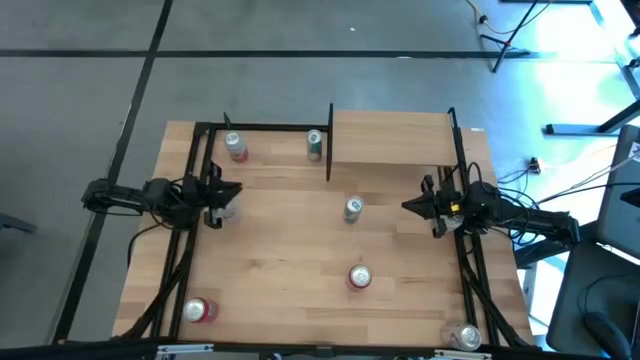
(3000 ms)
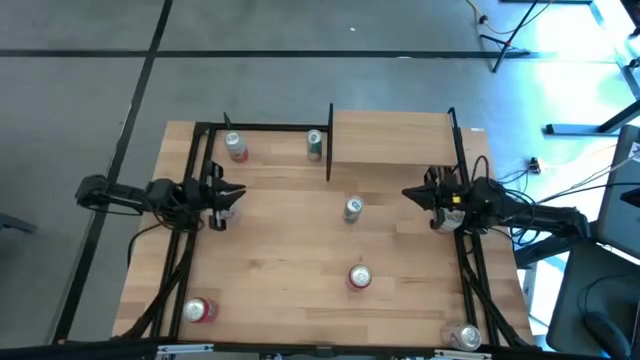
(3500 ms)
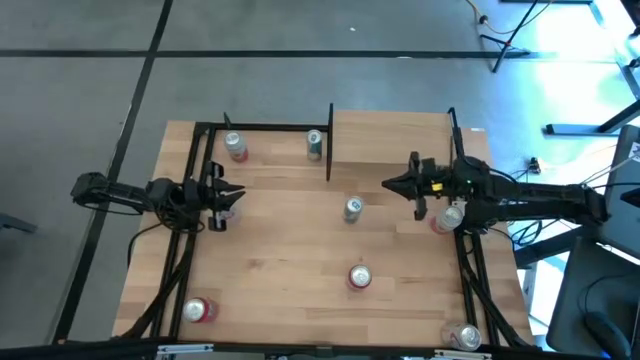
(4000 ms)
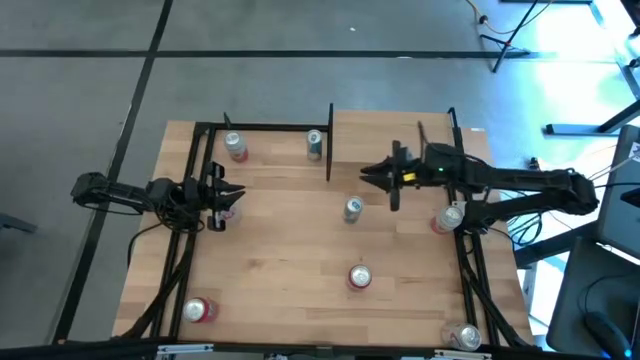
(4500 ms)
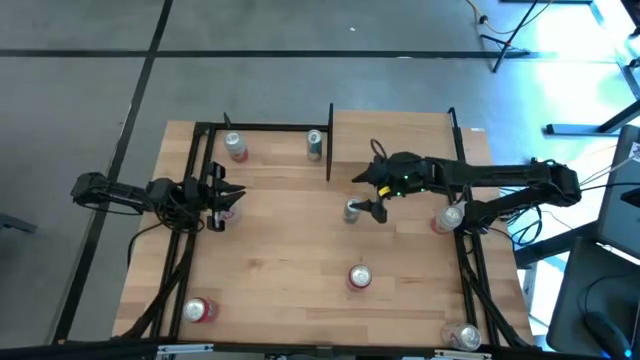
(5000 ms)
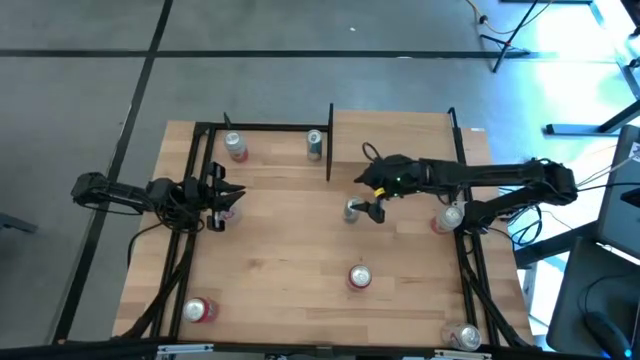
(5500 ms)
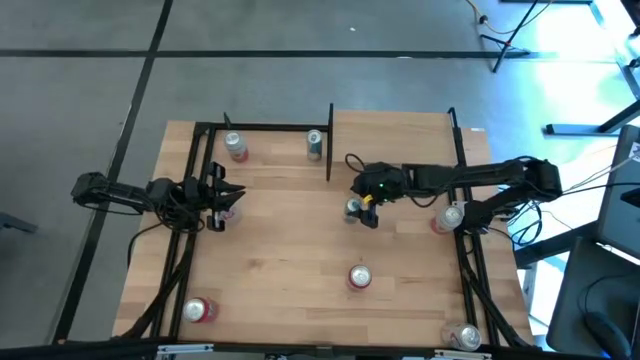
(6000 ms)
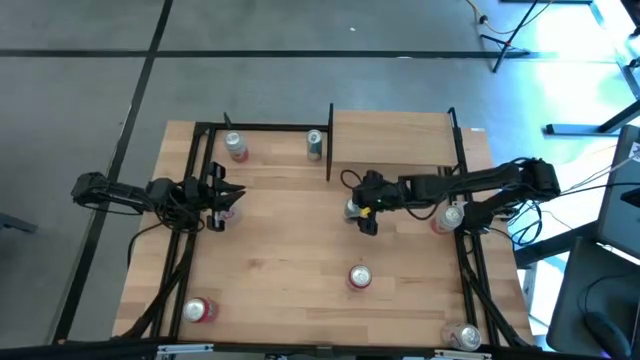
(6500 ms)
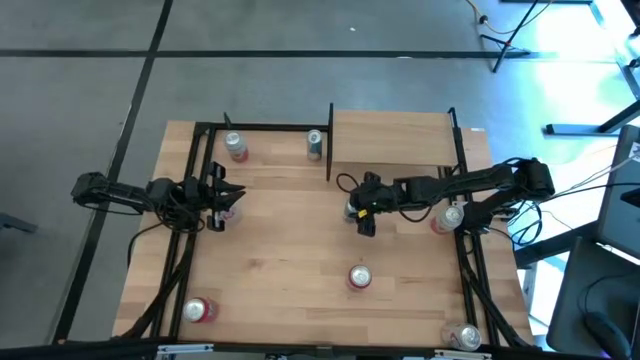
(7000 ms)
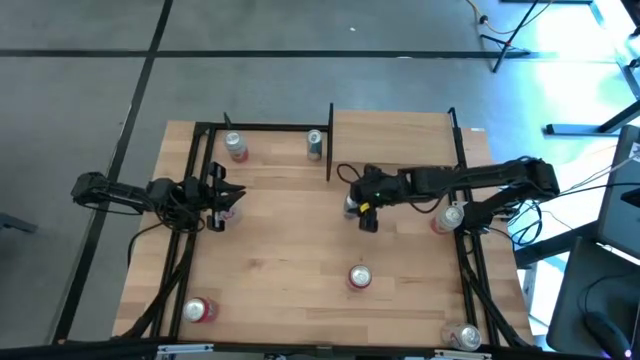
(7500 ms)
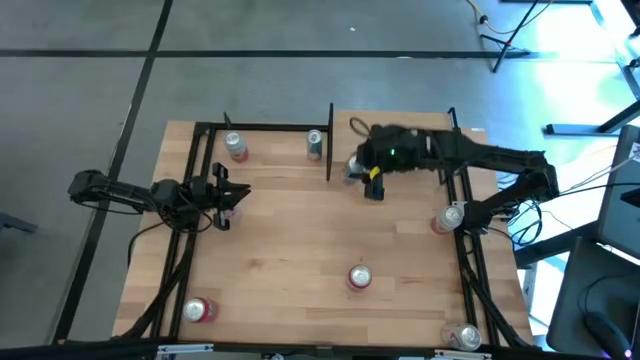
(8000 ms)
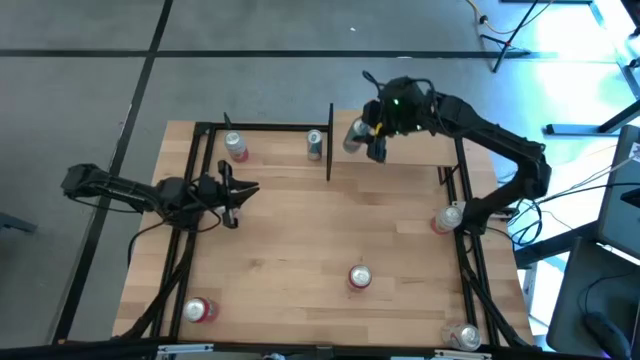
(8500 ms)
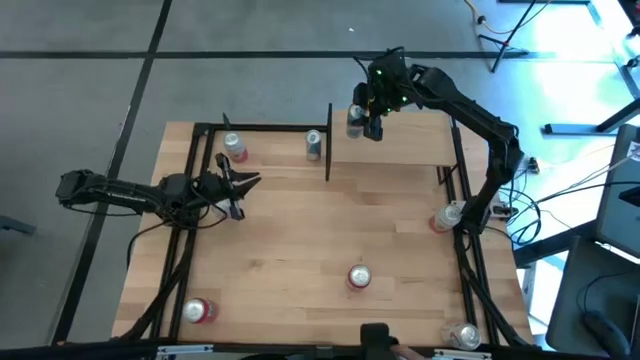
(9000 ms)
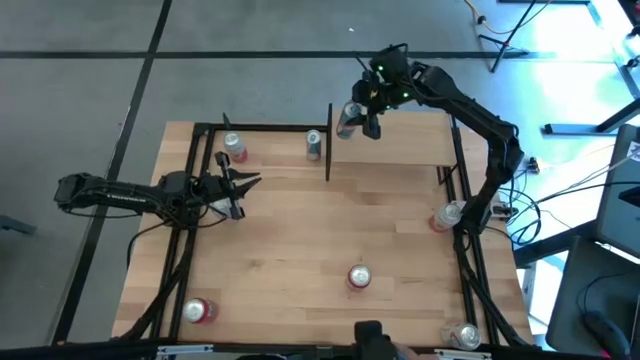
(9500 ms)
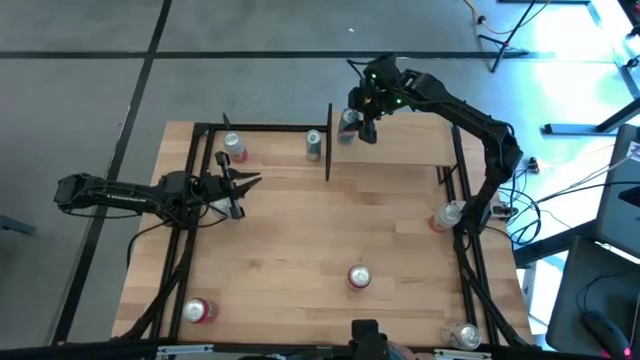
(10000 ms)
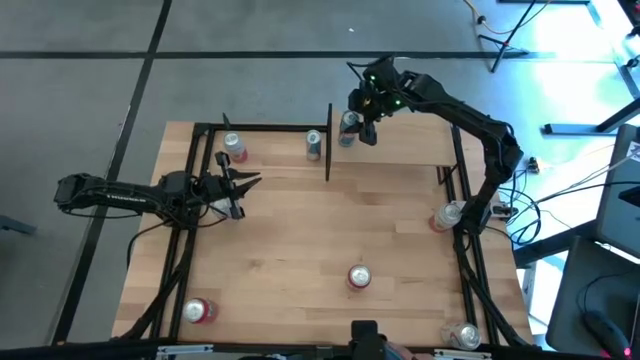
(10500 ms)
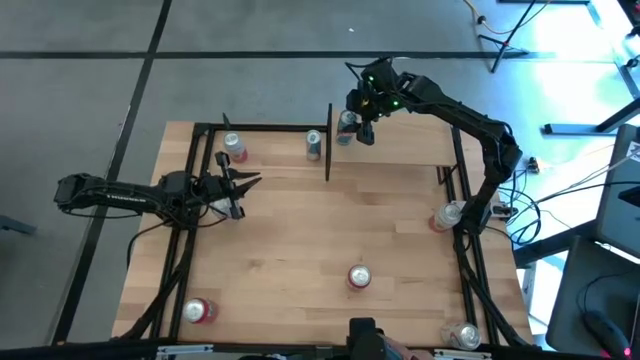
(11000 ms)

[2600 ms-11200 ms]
Task: Place canned beverage on shelf
Put the bottom blue soda can on the shelf

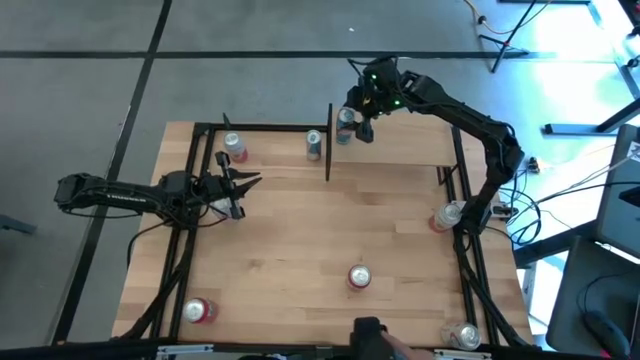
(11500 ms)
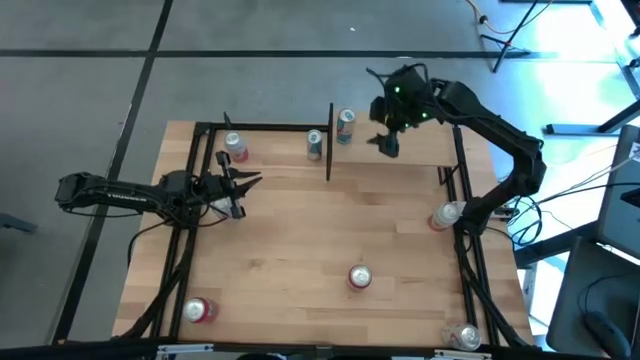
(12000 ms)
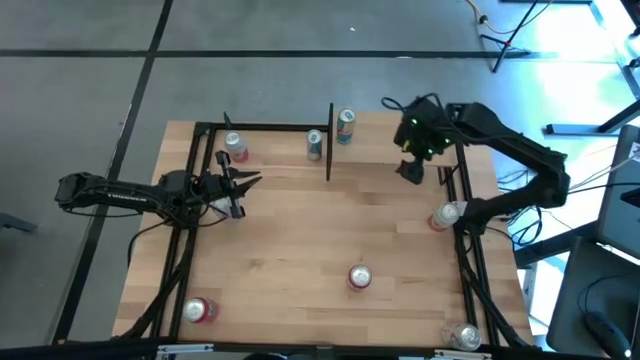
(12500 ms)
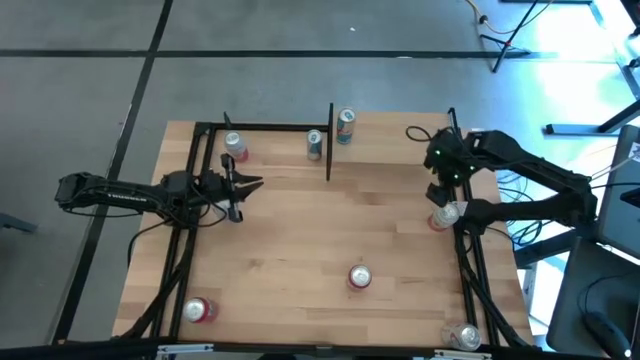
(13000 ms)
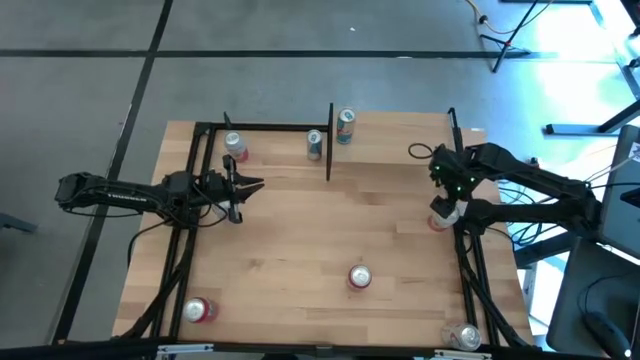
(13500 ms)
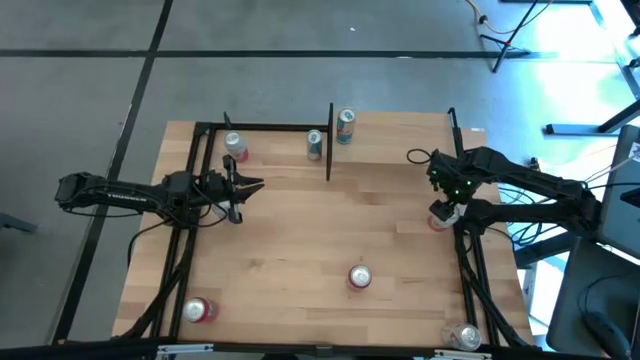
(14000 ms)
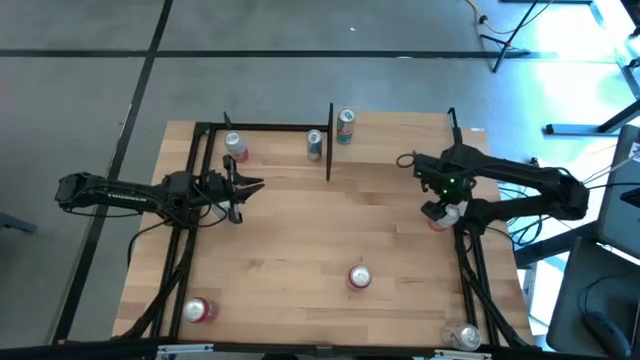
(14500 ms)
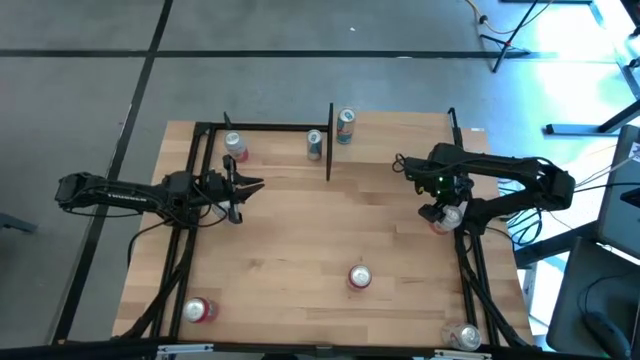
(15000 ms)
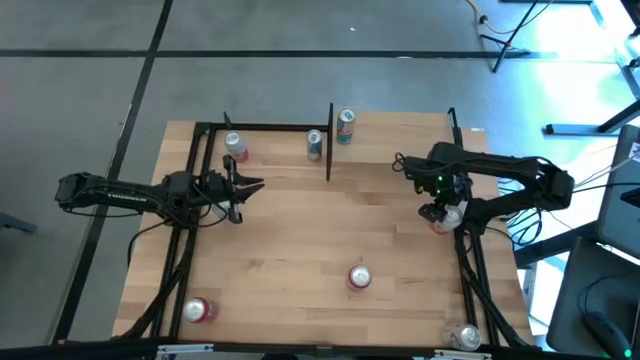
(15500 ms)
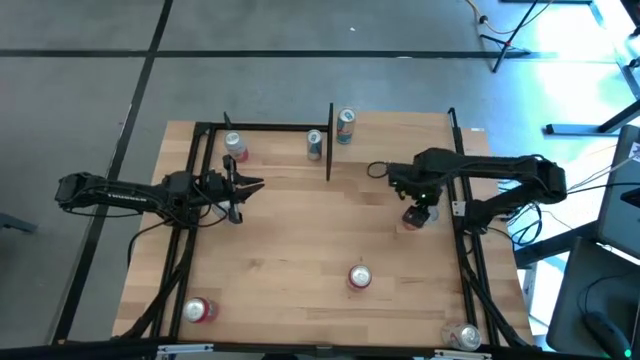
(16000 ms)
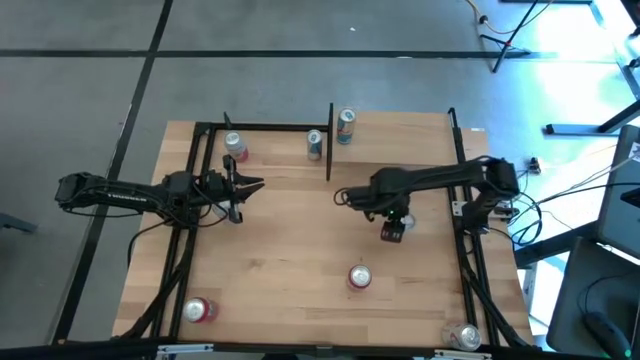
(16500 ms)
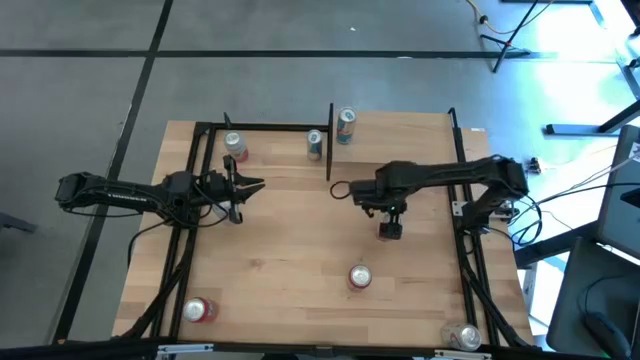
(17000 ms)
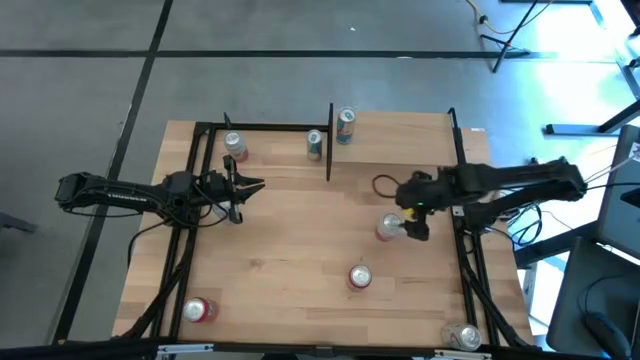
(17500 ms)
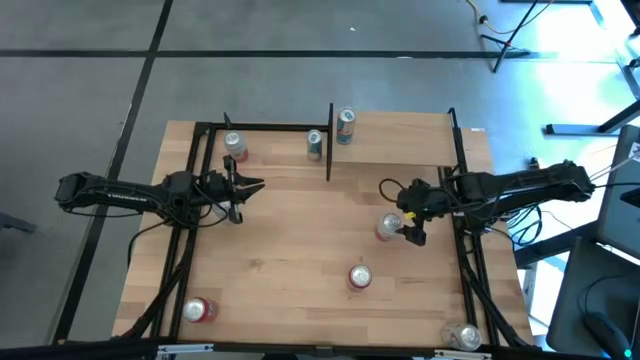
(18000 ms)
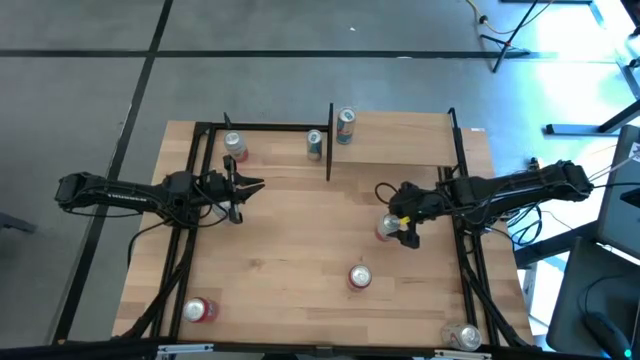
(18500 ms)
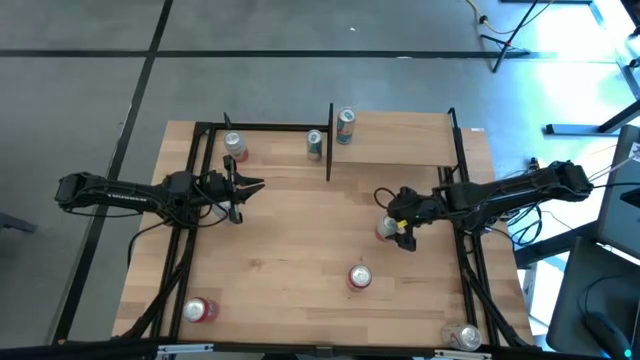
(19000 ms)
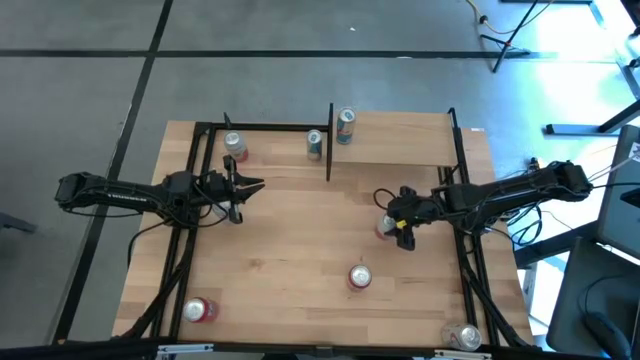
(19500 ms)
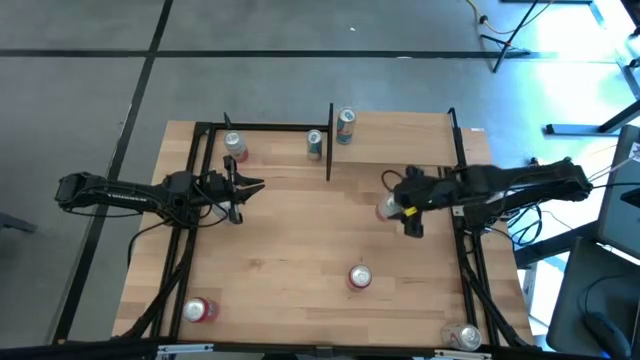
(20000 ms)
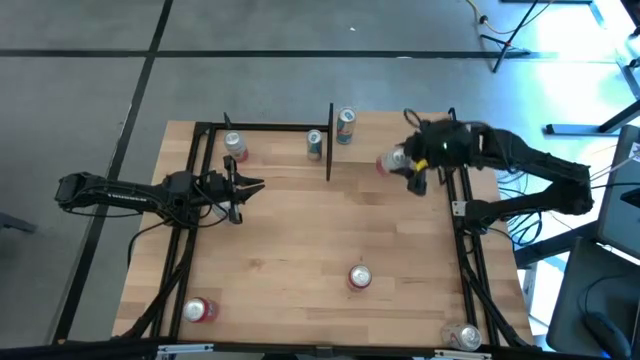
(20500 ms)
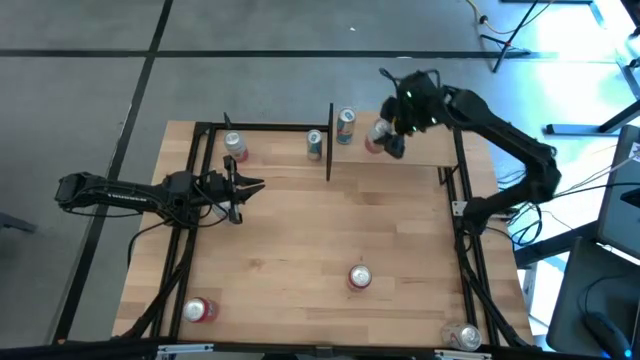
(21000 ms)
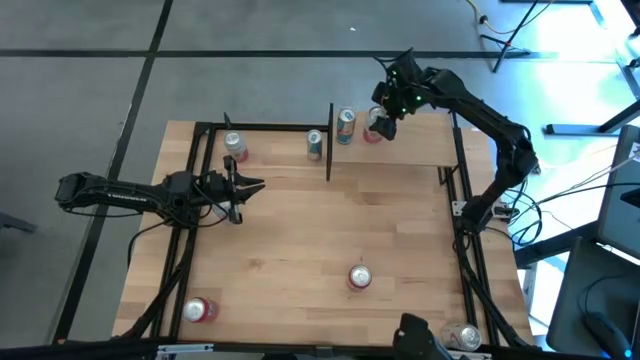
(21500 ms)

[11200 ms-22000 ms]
Put the bottom right white pink soda can on the shelf

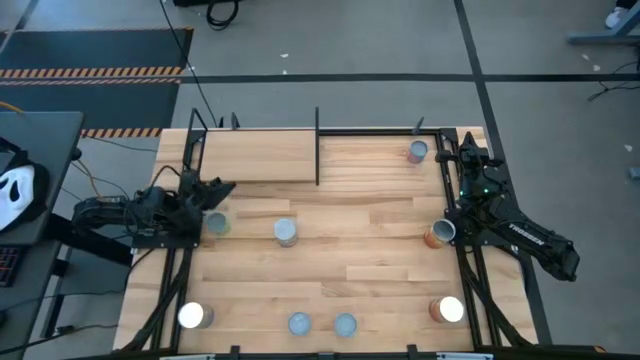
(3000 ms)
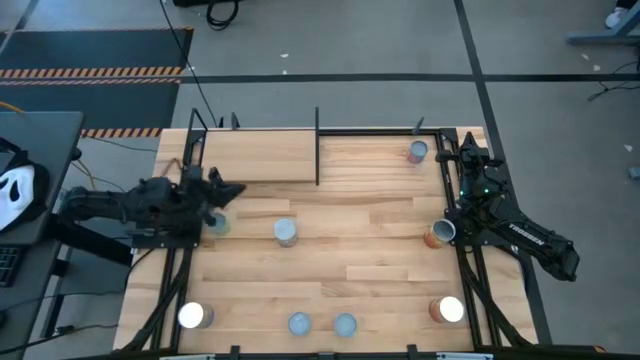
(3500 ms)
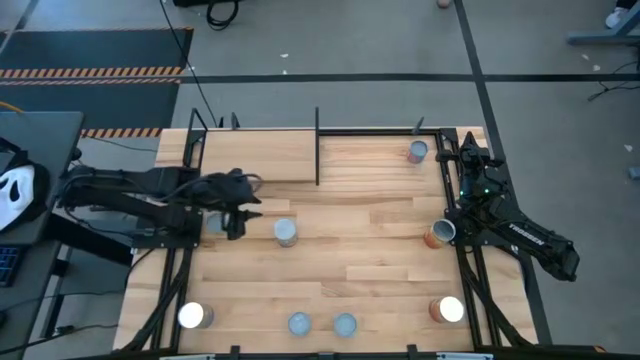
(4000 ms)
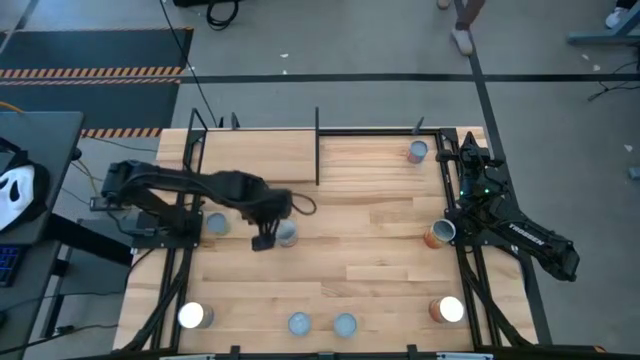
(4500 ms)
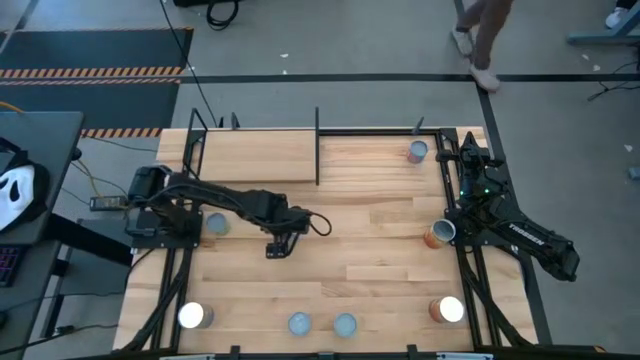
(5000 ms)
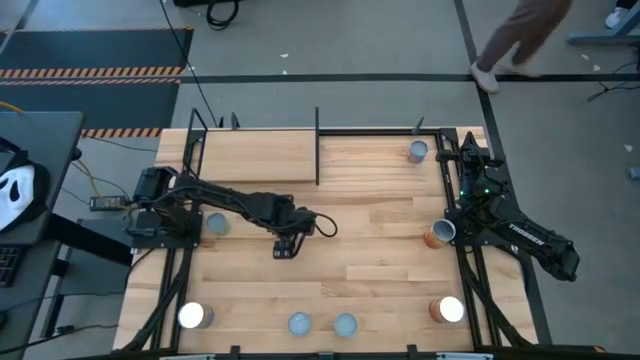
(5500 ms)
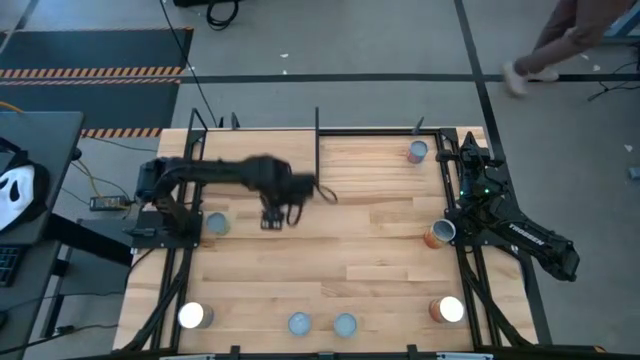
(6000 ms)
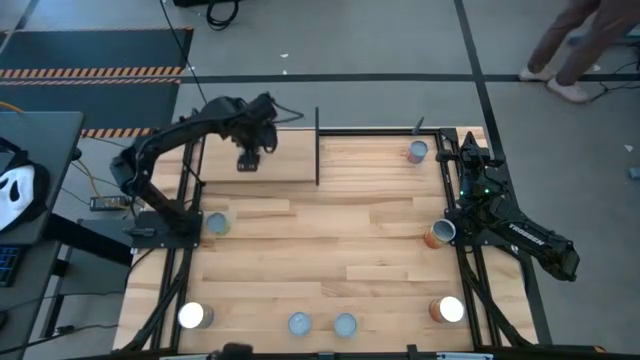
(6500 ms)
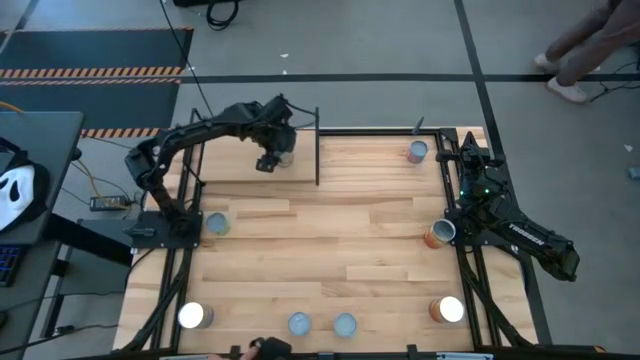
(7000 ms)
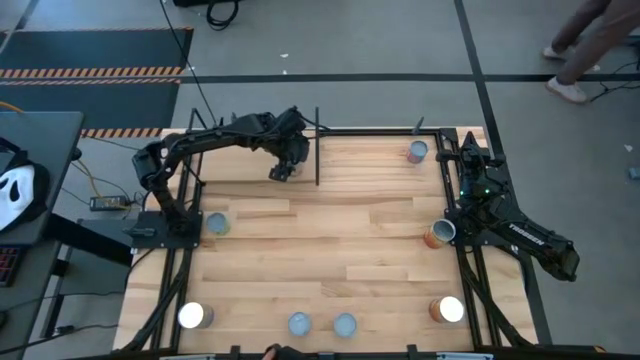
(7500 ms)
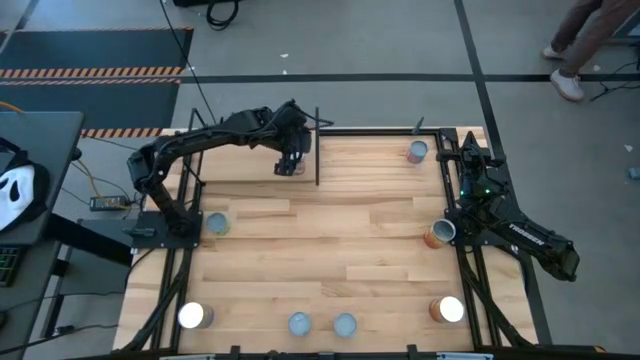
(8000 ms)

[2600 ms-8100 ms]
Task: Pick and place cans onto a shelf
Put the top can of peaches on the shelf
